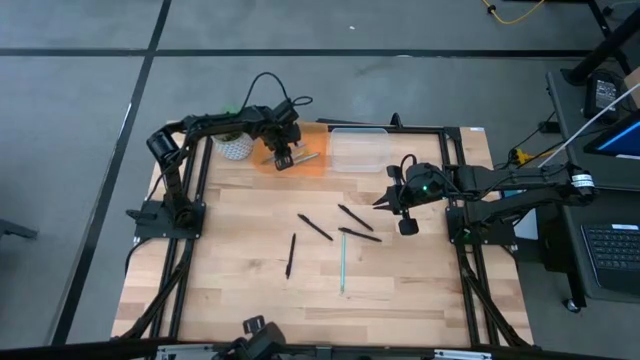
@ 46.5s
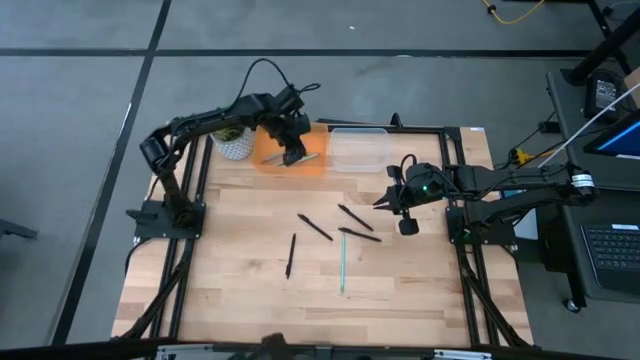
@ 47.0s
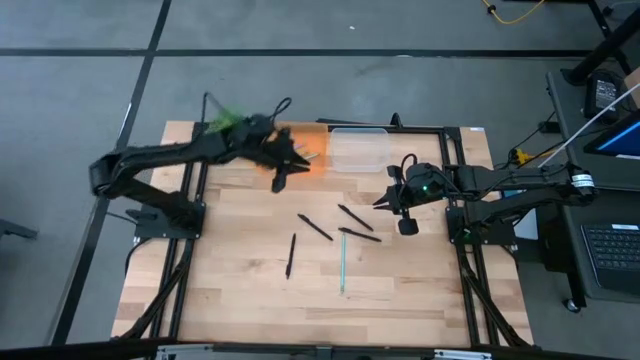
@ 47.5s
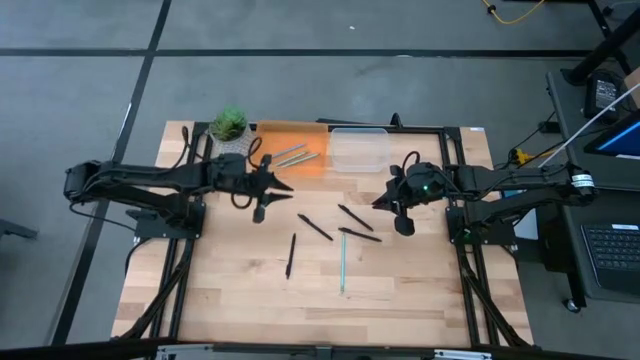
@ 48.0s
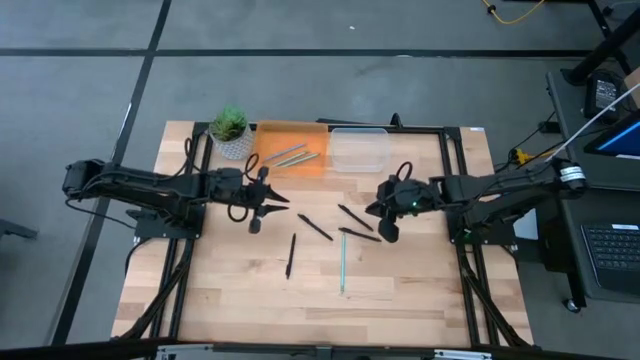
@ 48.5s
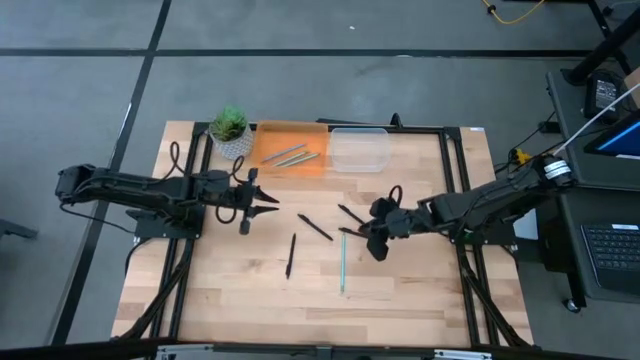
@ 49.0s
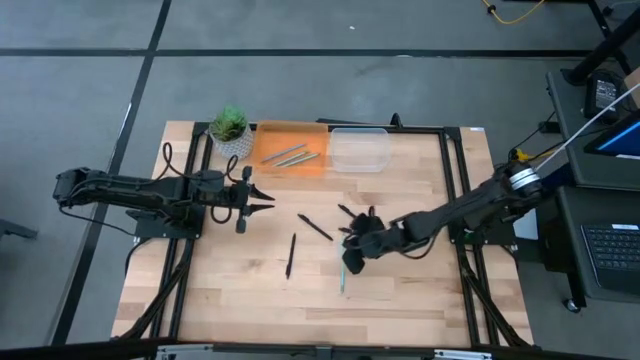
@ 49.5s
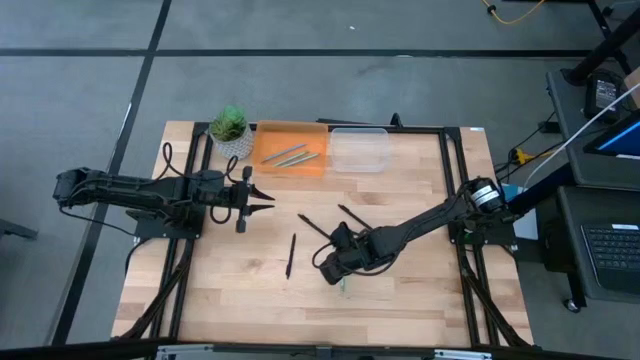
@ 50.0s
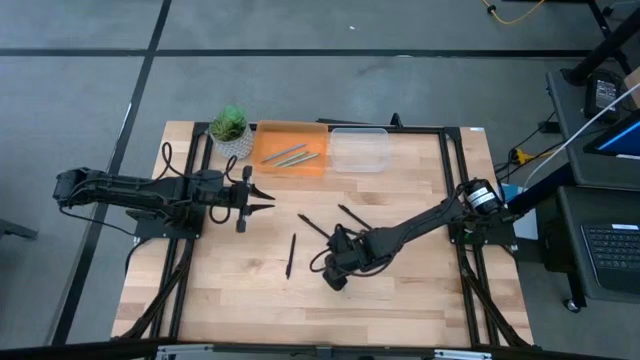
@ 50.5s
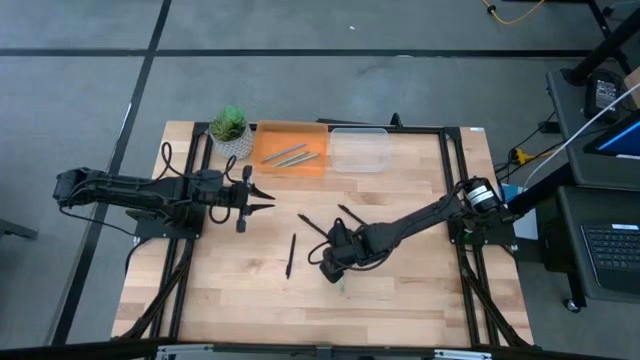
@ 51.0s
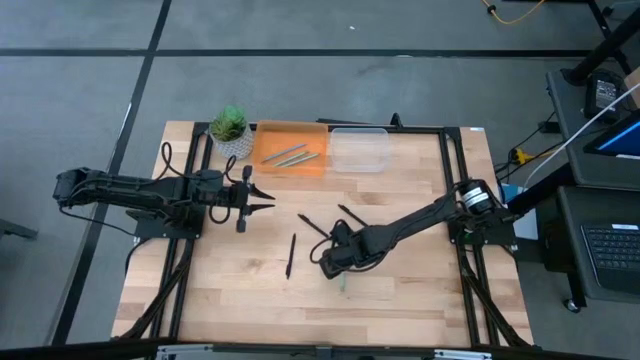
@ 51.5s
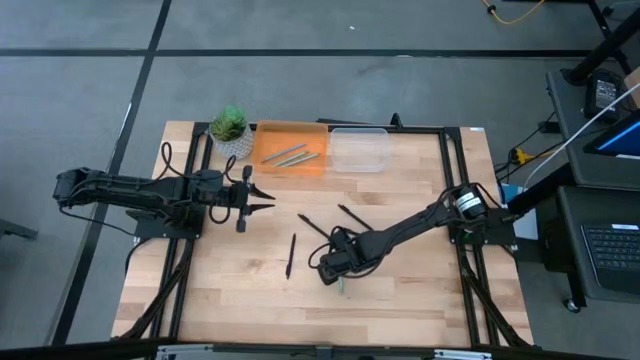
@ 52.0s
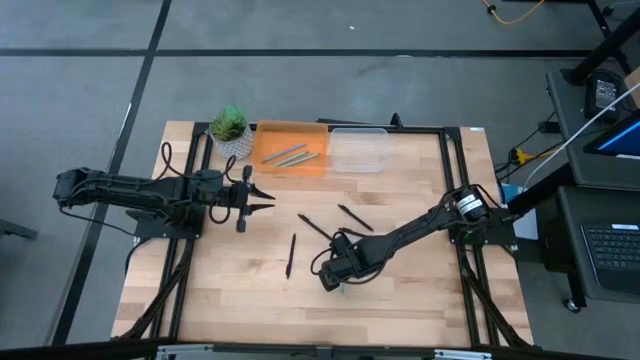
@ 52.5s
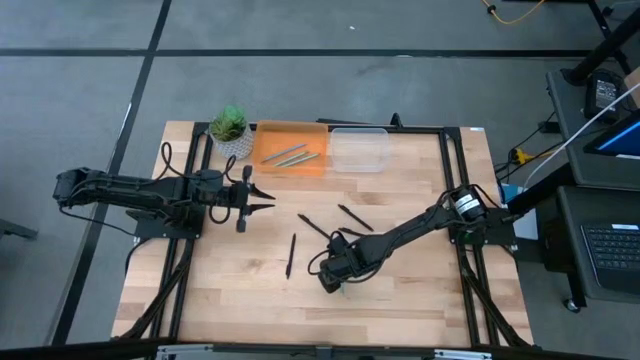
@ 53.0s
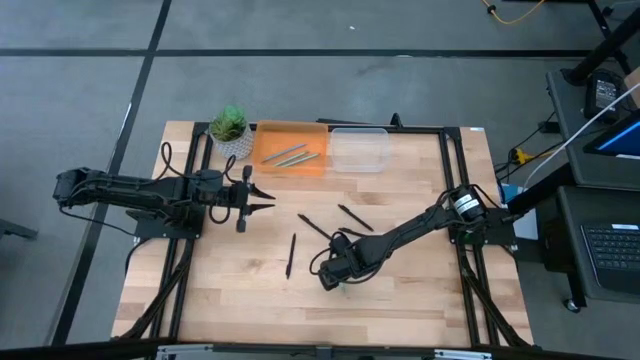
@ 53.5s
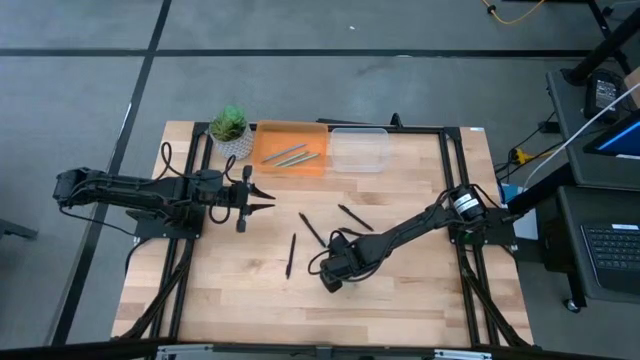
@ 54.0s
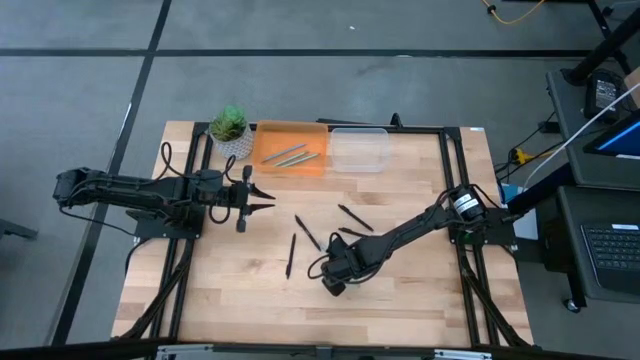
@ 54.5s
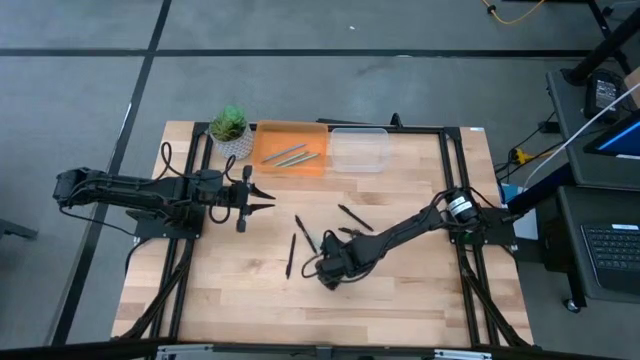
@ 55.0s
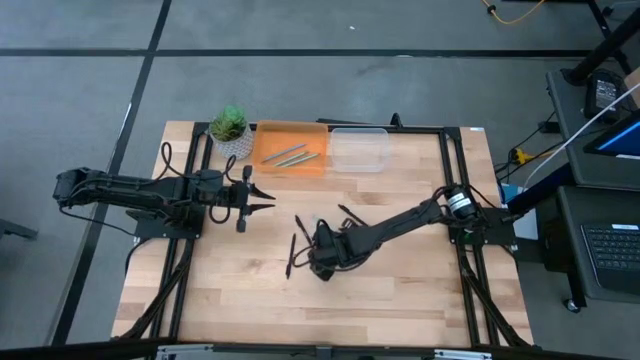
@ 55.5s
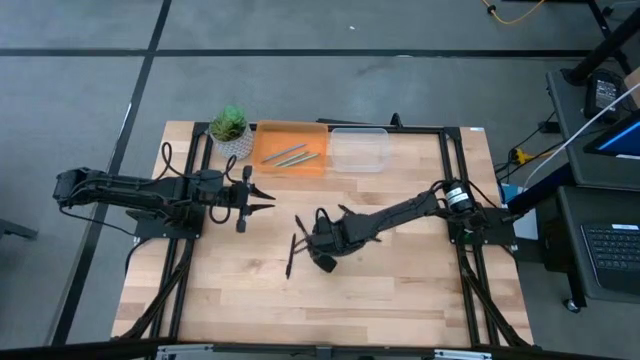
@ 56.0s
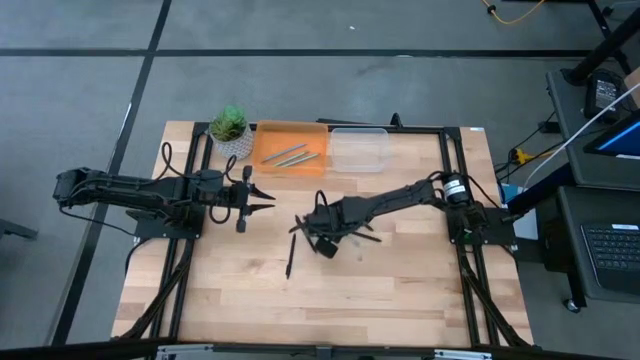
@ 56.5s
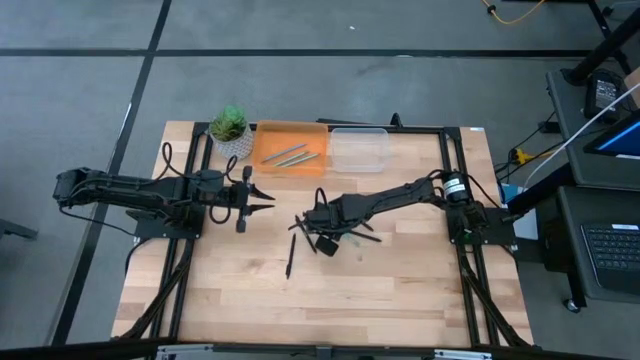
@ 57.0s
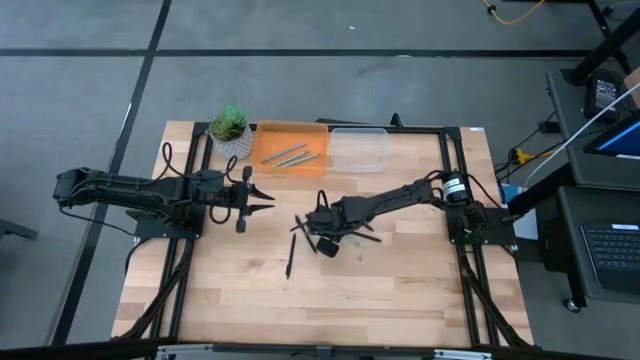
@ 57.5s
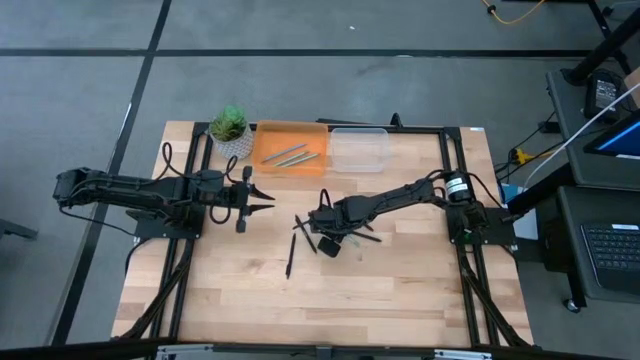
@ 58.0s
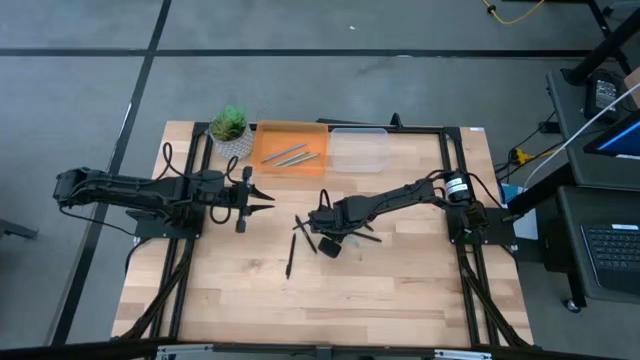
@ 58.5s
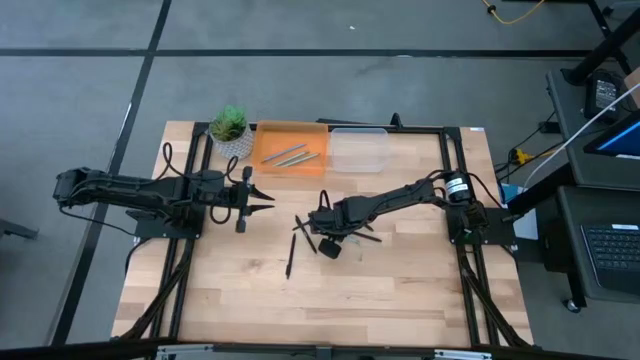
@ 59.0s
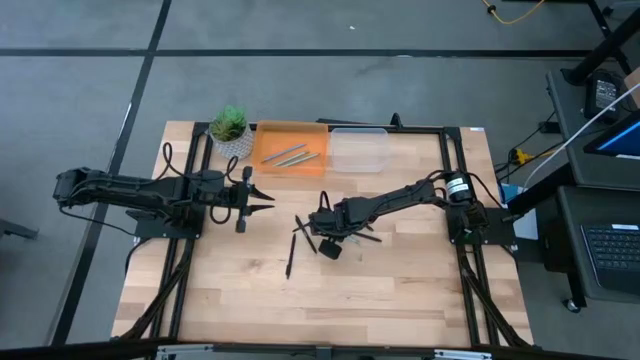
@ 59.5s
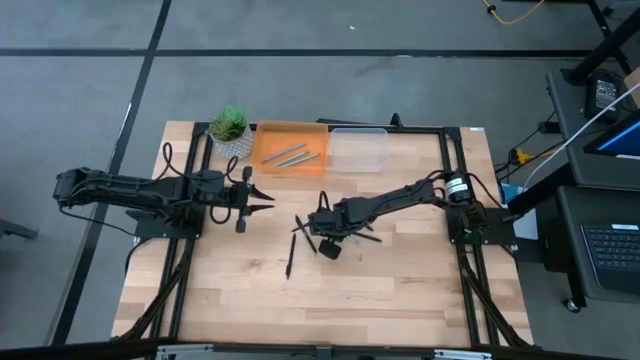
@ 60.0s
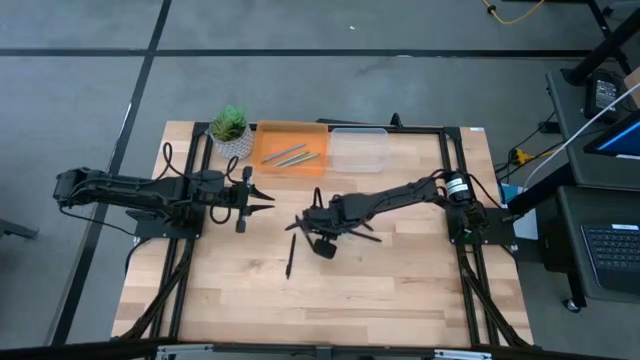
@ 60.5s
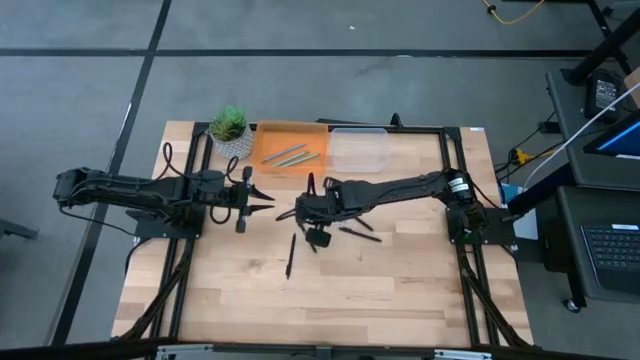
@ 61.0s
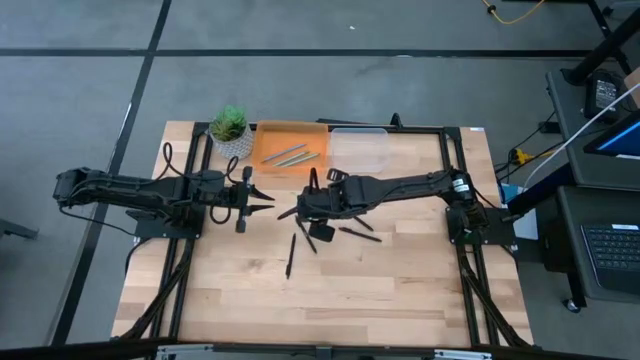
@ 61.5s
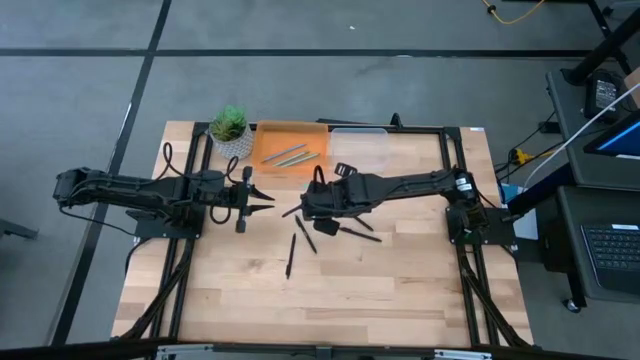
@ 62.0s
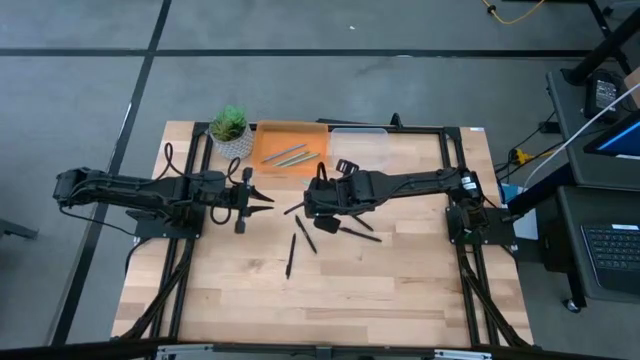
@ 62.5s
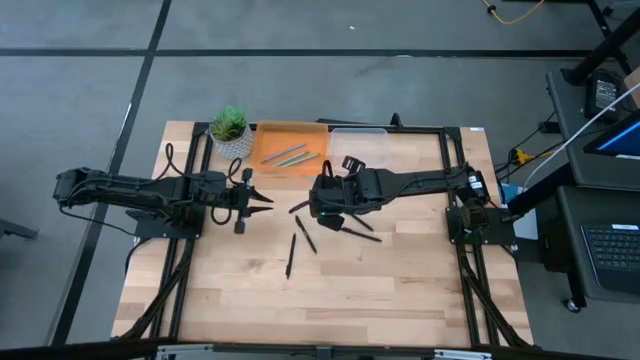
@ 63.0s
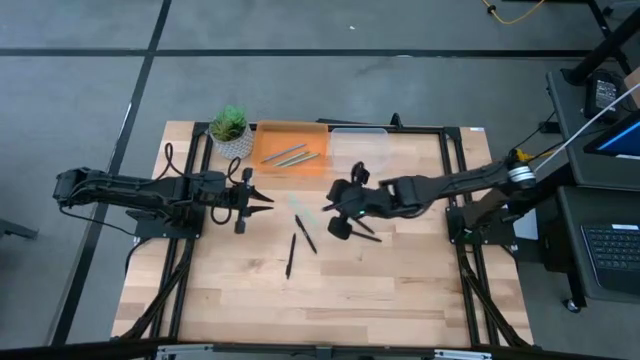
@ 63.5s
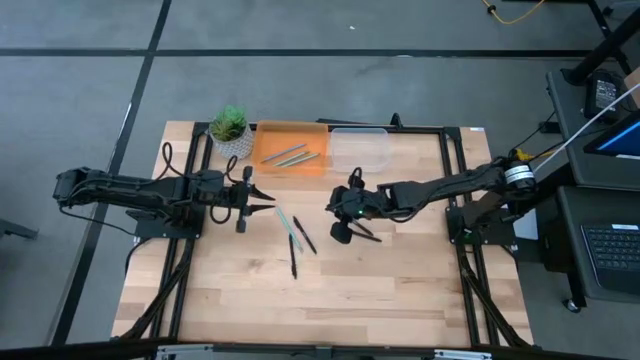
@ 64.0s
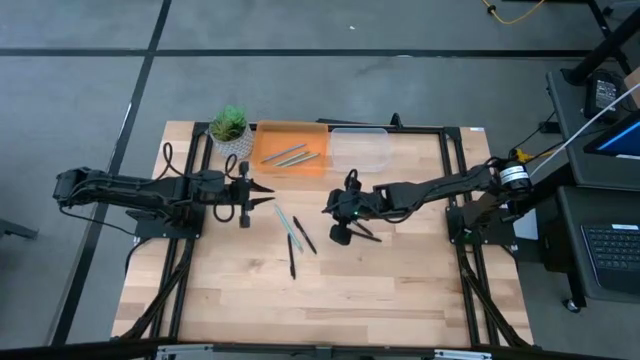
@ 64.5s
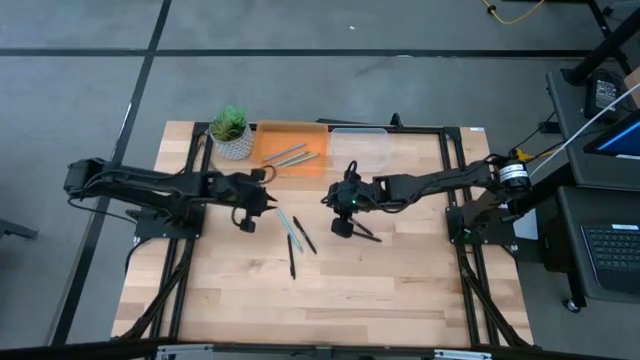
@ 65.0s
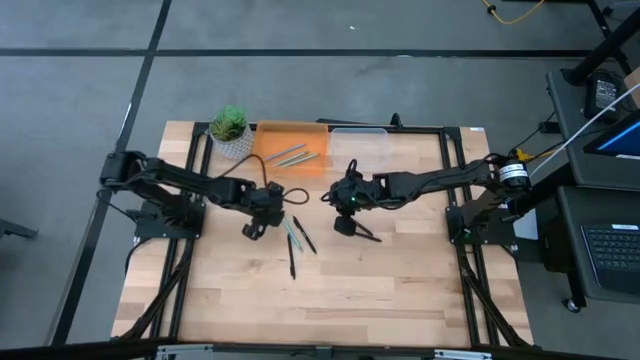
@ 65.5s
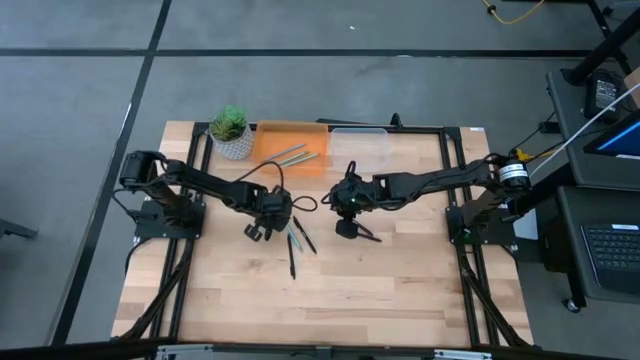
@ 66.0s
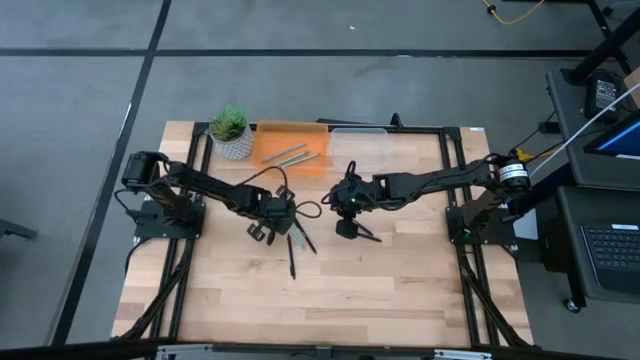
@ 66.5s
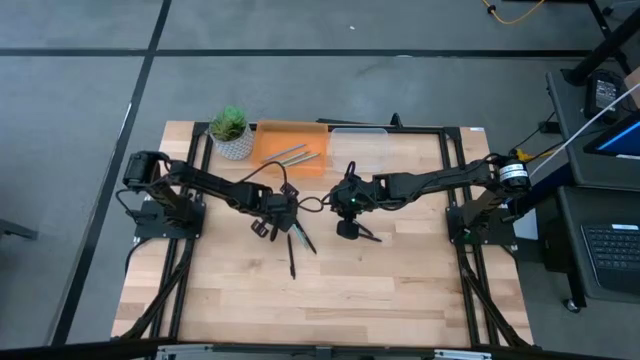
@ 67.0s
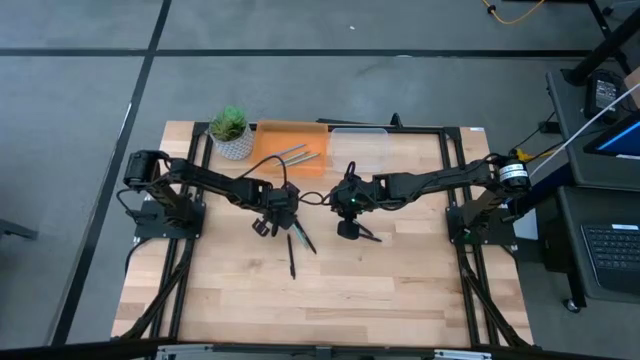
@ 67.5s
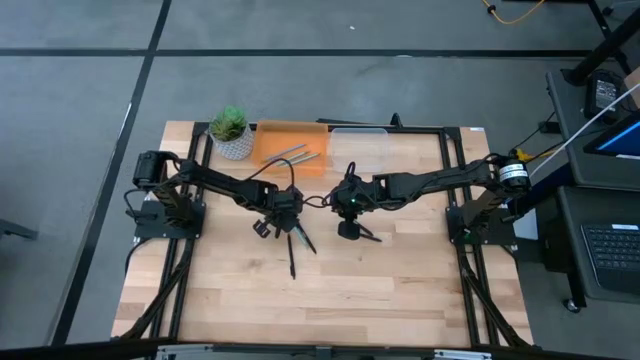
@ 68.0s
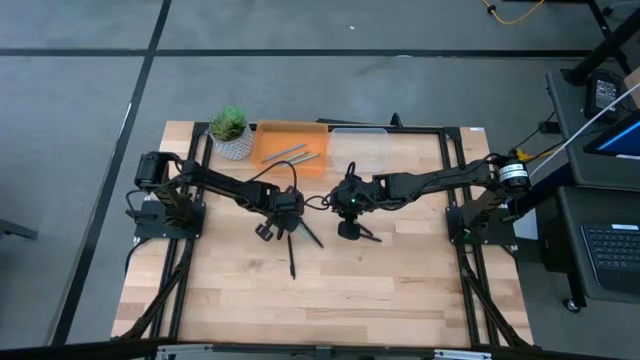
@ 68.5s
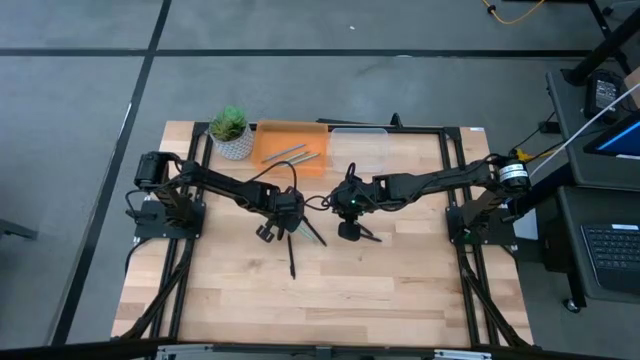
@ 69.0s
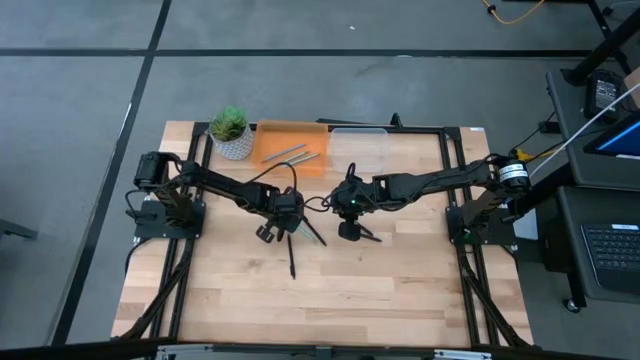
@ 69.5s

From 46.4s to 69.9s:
Task: Sort pens & pencils
Put the light blue pencil into the orange bin
